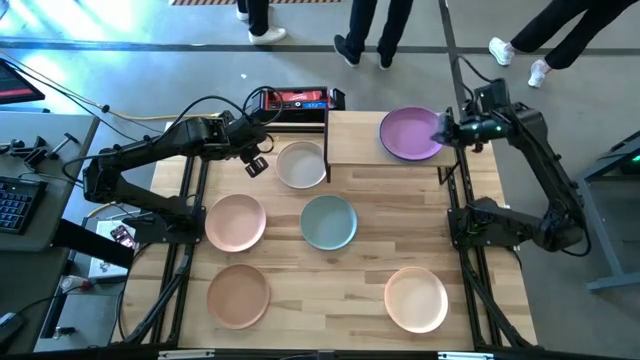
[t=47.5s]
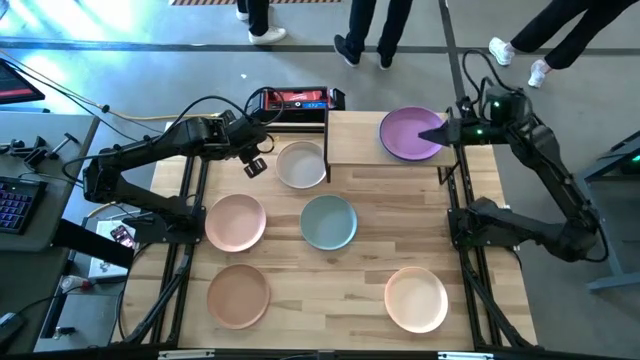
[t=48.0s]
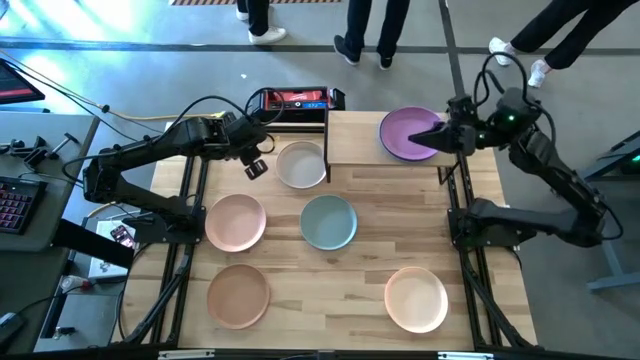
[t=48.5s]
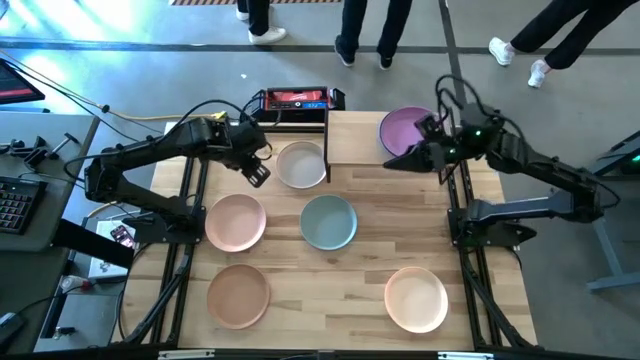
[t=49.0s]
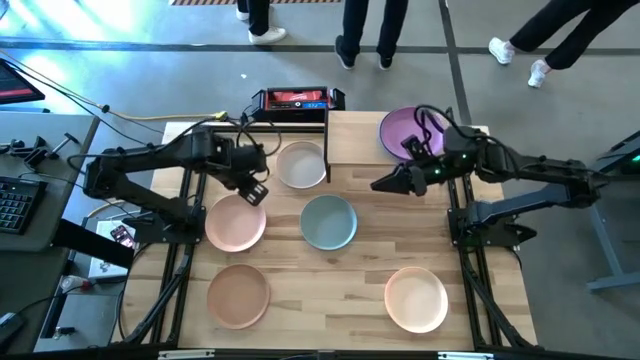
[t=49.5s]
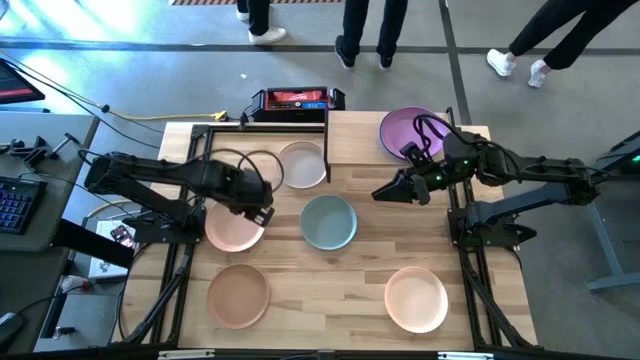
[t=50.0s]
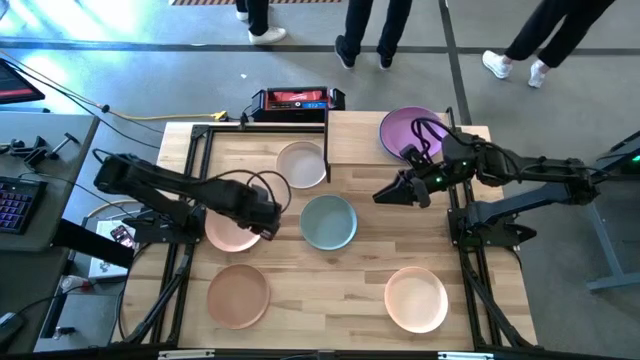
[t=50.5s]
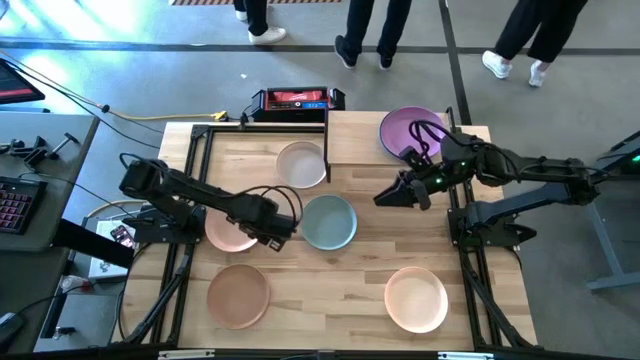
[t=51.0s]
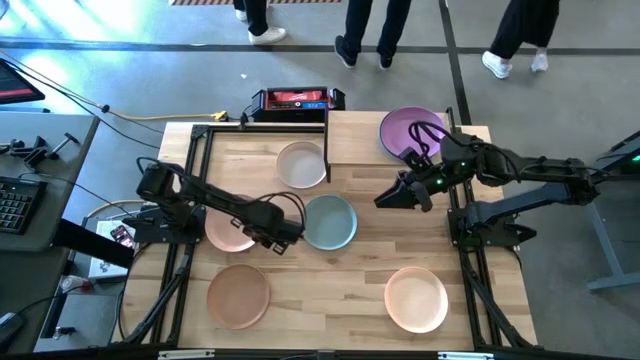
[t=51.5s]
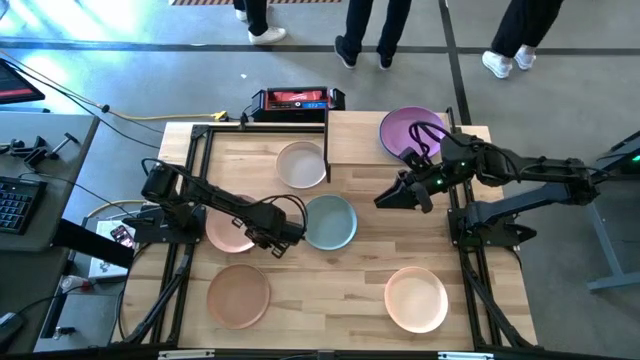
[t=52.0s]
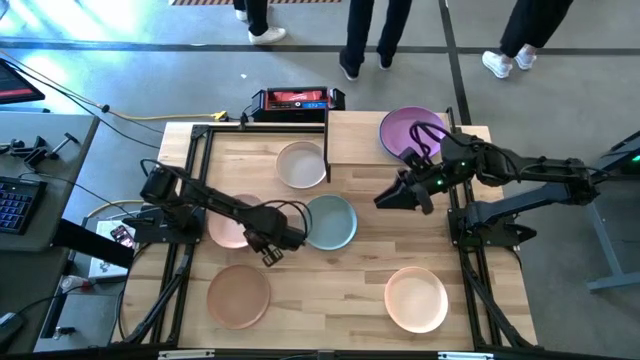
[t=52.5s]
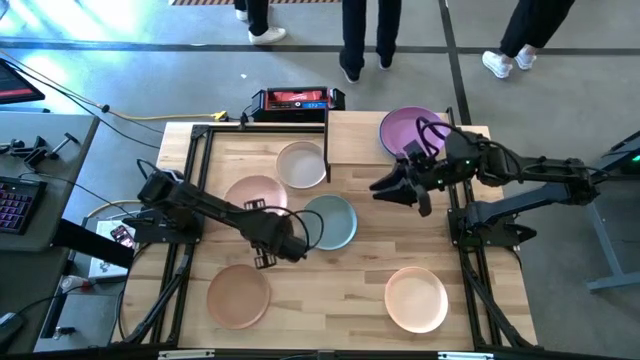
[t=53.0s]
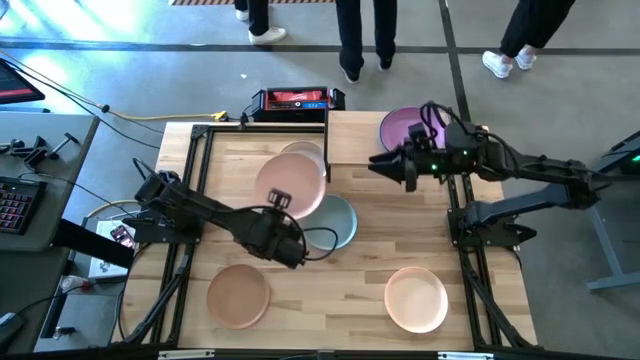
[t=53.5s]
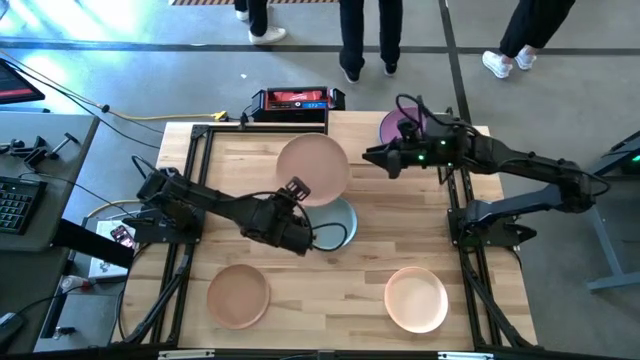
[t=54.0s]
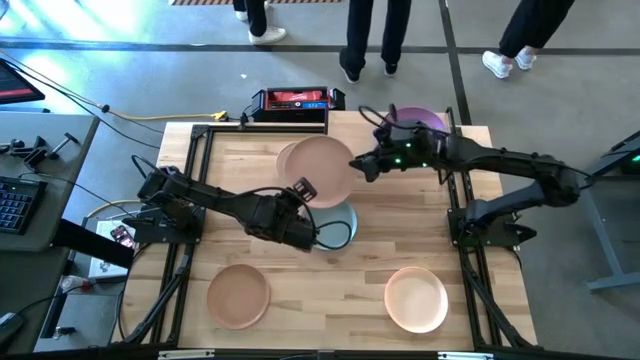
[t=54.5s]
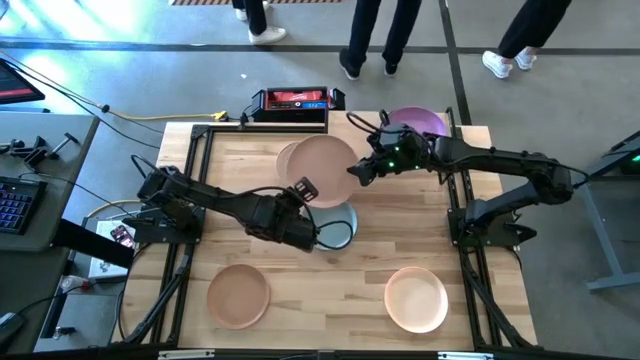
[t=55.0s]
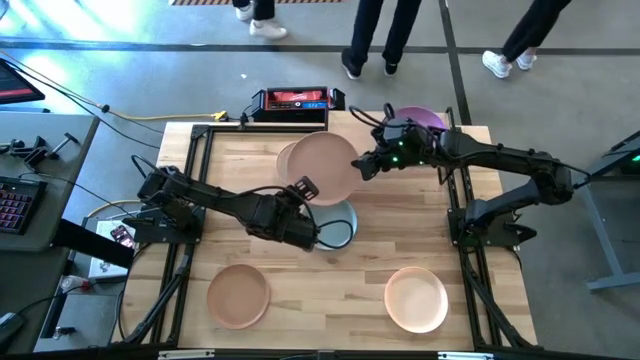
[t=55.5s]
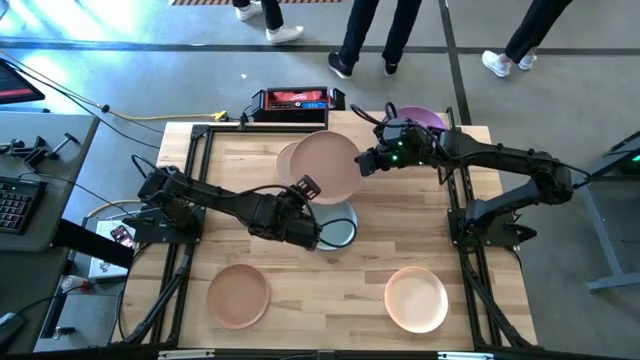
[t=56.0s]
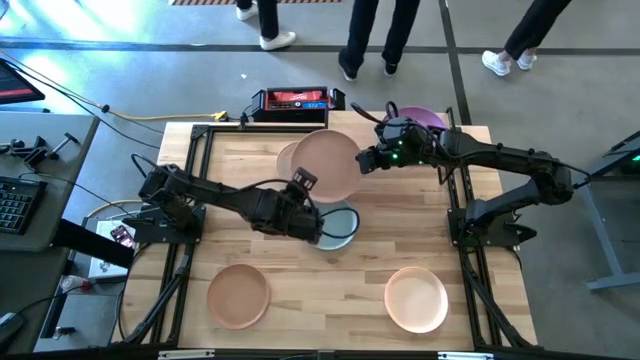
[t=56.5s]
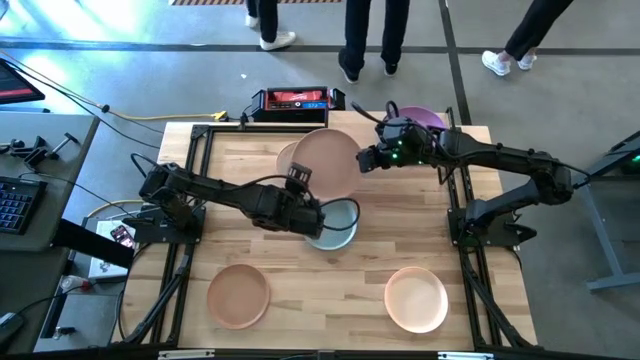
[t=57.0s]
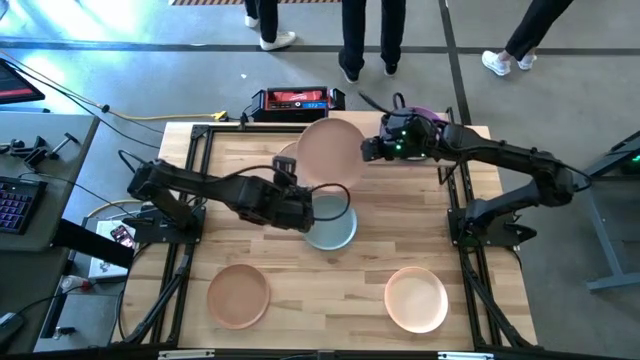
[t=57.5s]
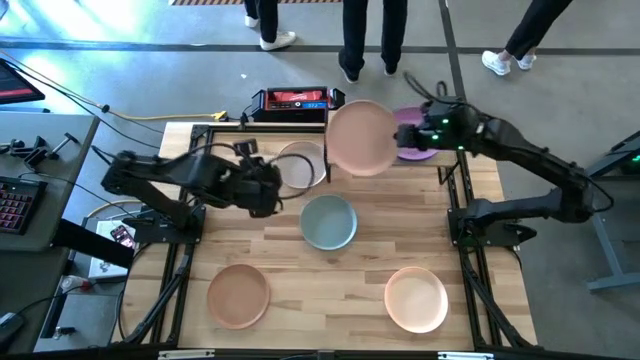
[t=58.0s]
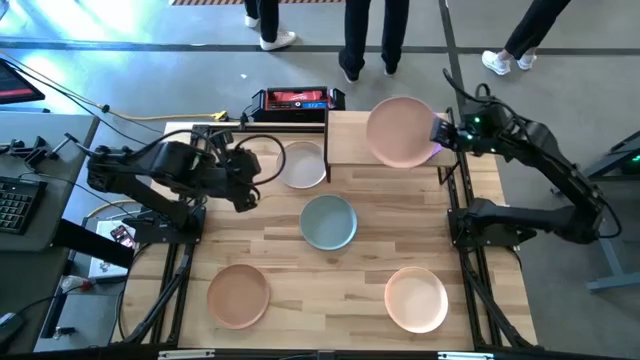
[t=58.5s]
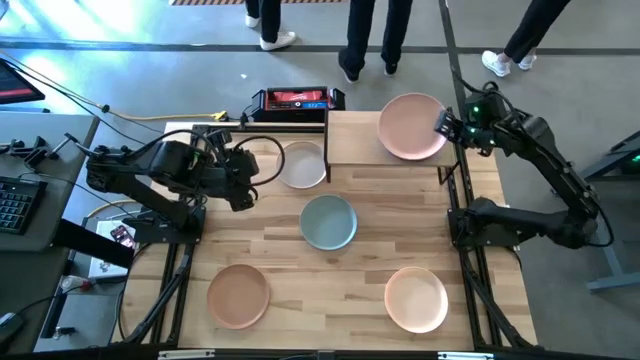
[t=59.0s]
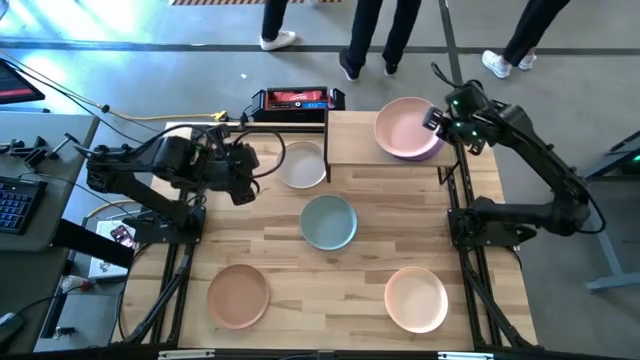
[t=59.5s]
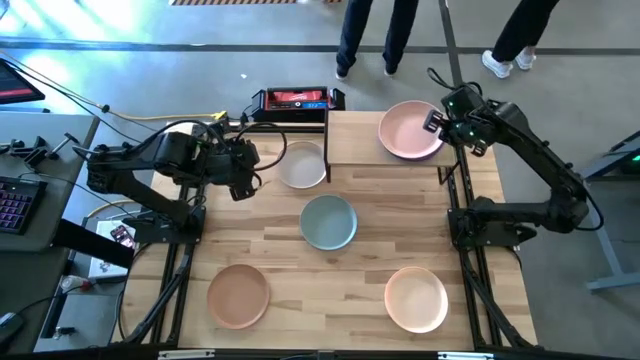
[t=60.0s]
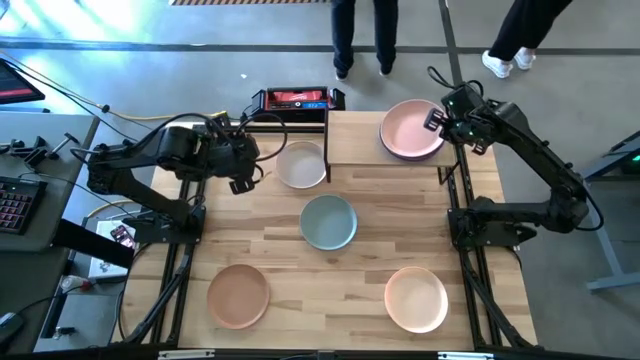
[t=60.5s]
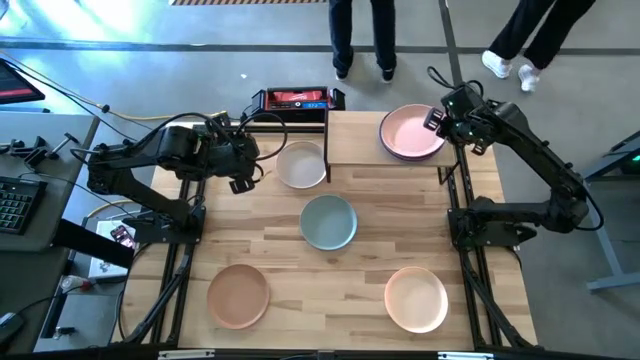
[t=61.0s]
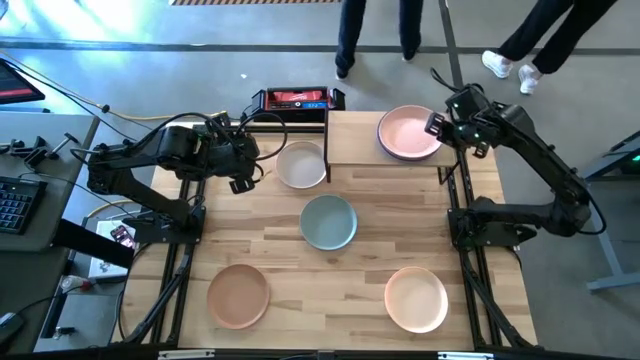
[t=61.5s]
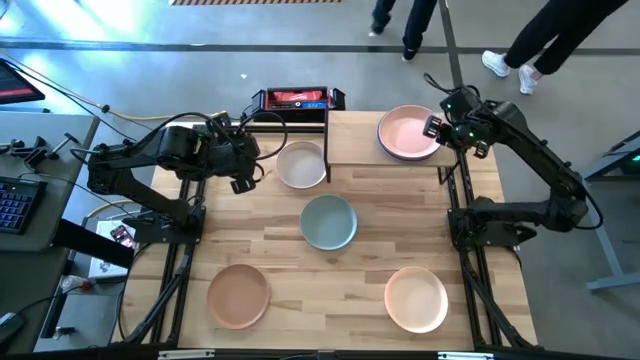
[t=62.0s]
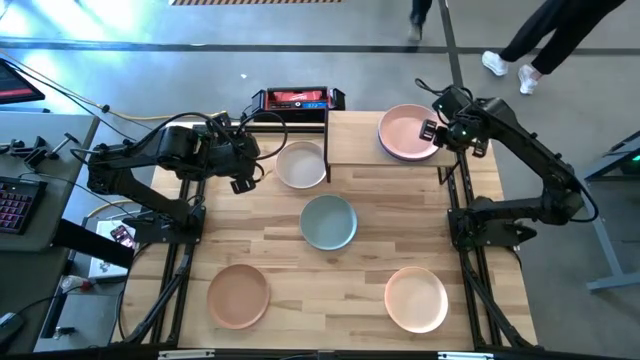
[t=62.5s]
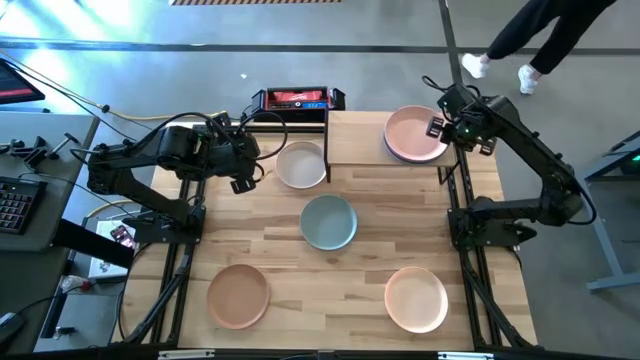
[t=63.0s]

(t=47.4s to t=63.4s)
Task: Place and stack plates onto a shelf
Stack the pink plate on top of the purple plate on the shelf

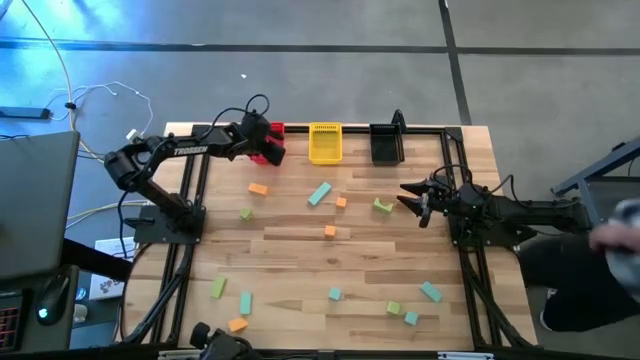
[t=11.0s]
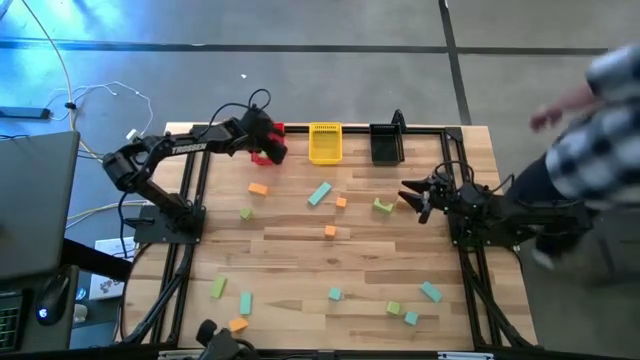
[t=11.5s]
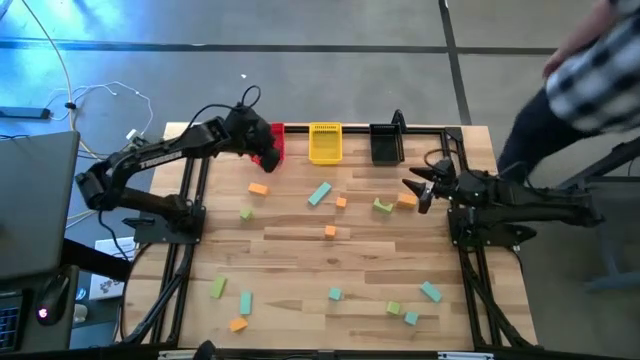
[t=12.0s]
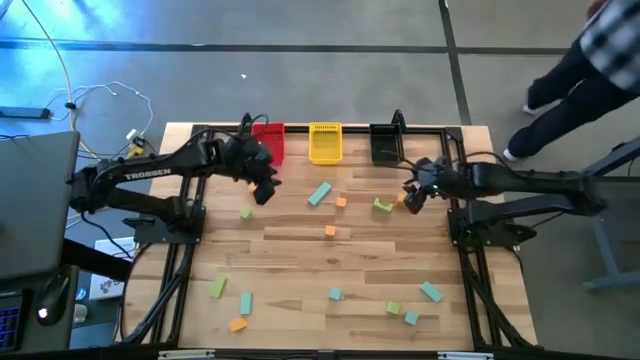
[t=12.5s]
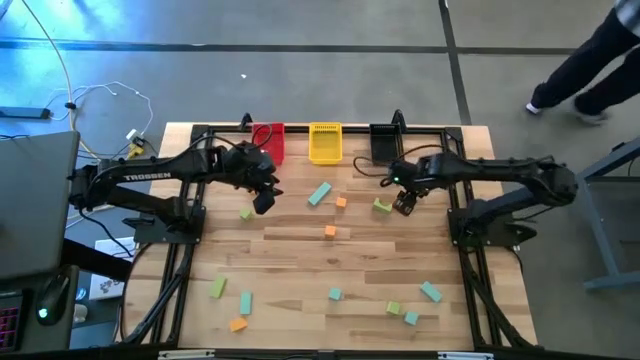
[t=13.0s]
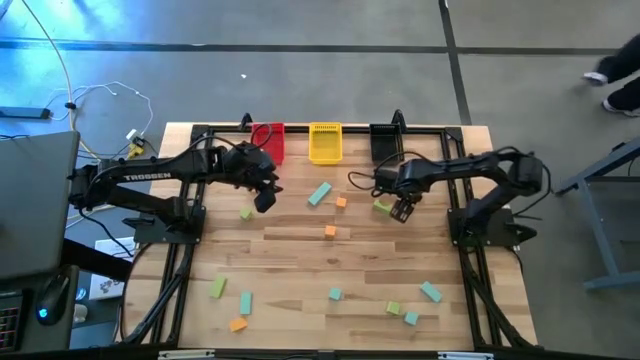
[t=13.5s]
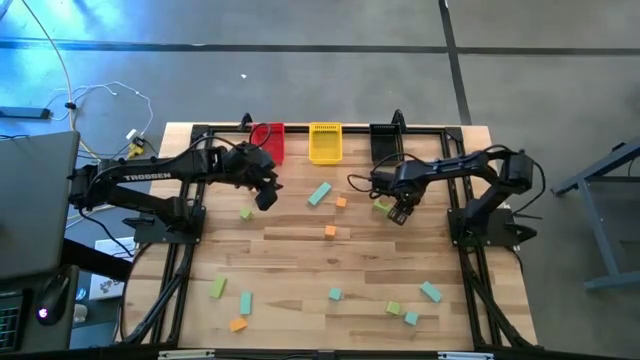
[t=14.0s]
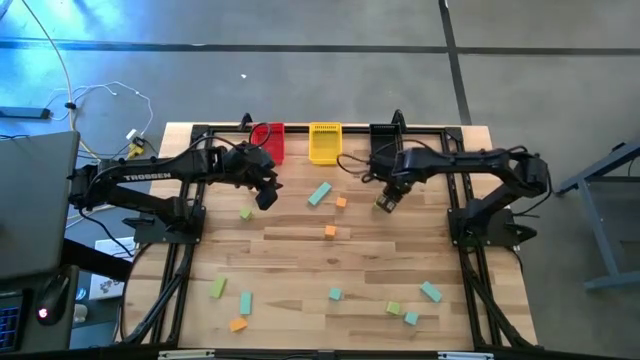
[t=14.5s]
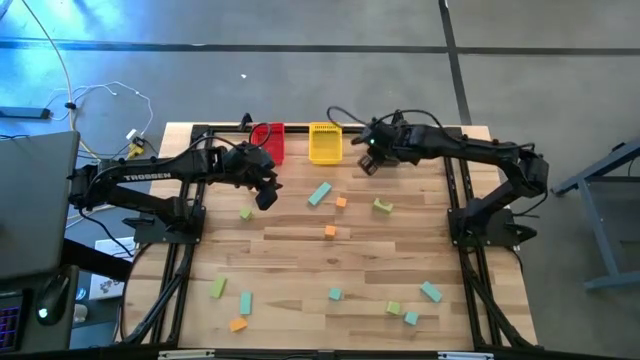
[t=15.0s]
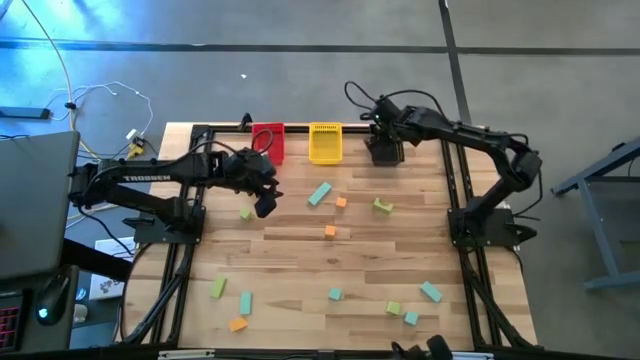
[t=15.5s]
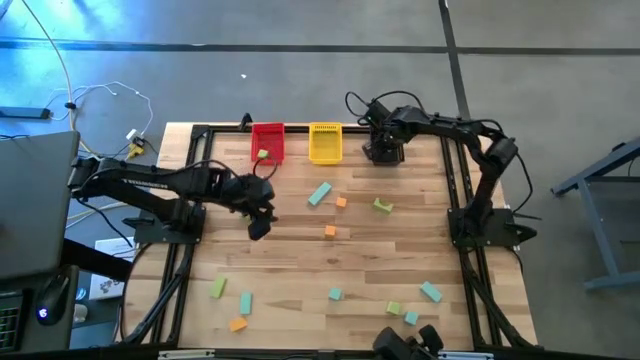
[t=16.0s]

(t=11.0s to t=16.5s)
Task: Sort & place blocks by color
Put the orange block into the black basket
